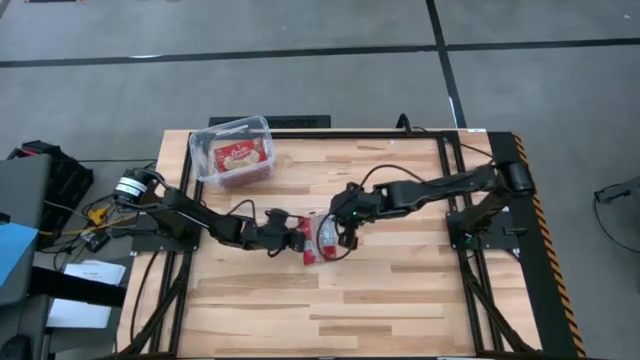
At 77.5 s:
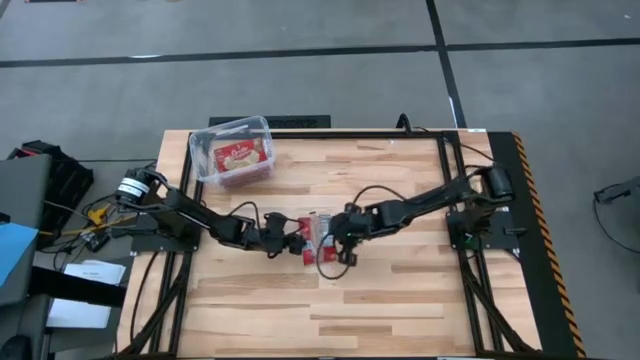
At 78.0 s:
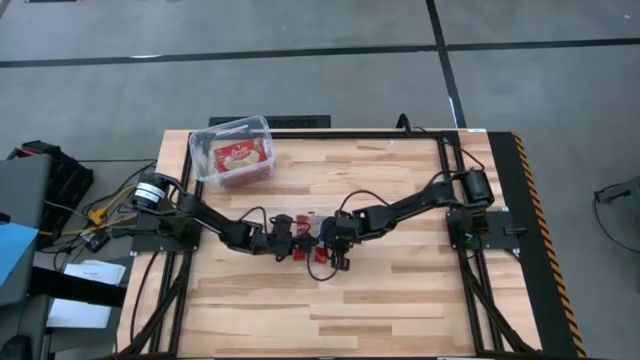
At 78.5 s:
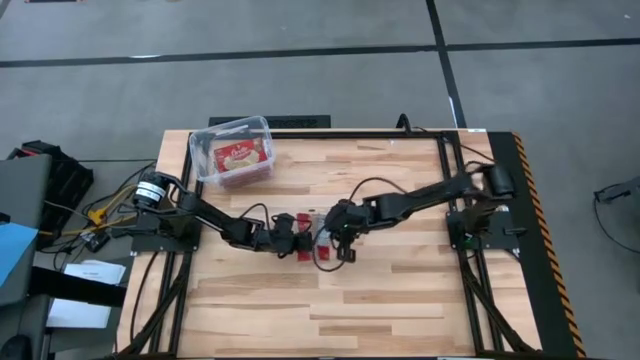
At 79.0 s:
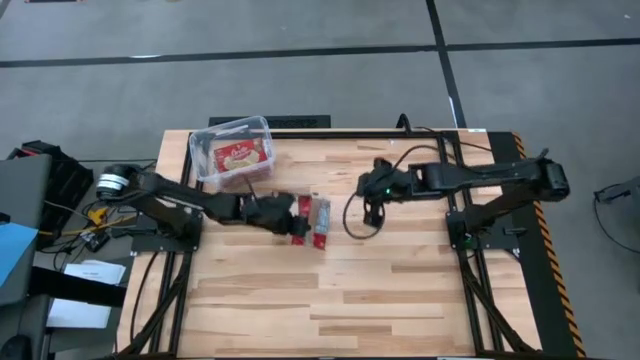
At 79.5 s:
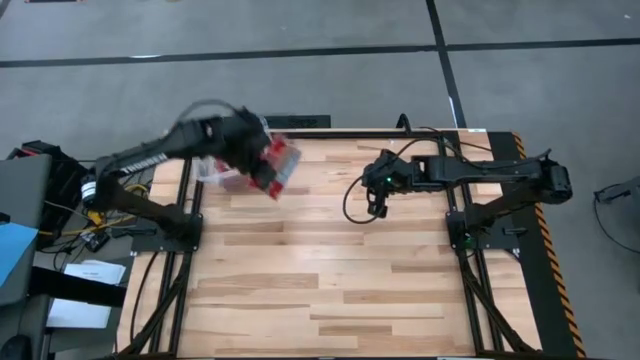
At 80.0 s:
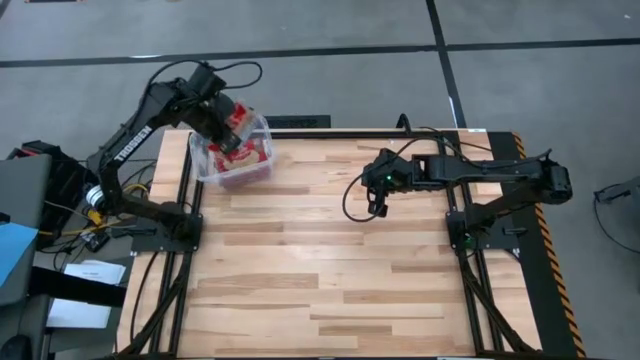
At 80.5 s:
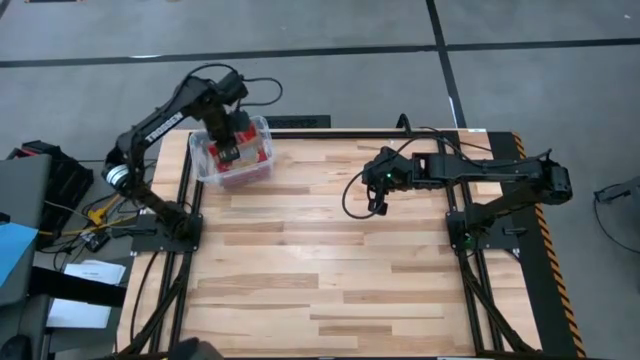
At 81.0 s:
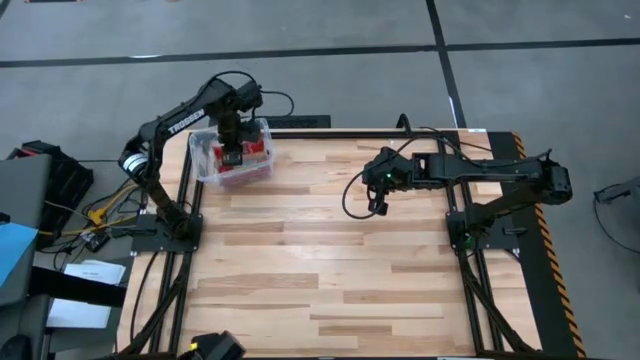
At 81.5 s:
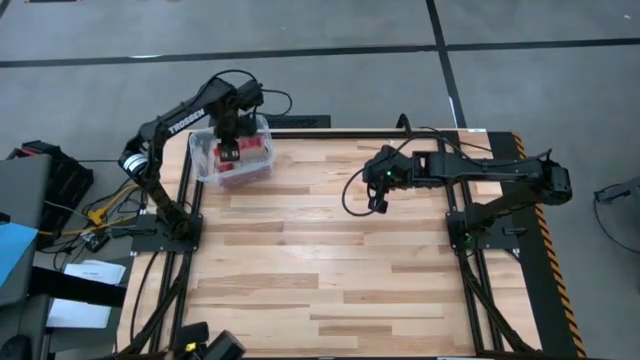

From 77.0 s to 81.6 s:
Task: Sort popcorn bags into baskets
Put the red popcorn bag into the transparent bin

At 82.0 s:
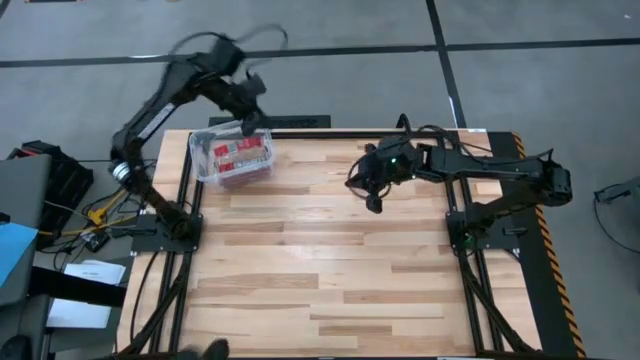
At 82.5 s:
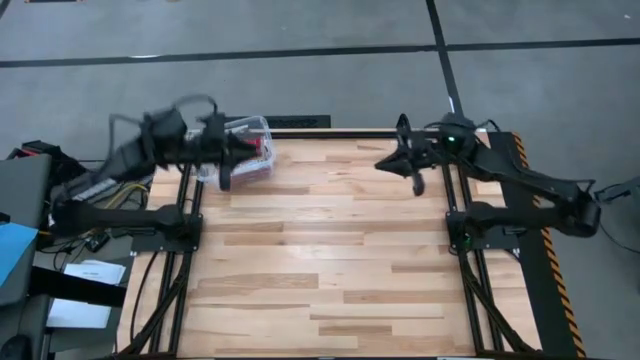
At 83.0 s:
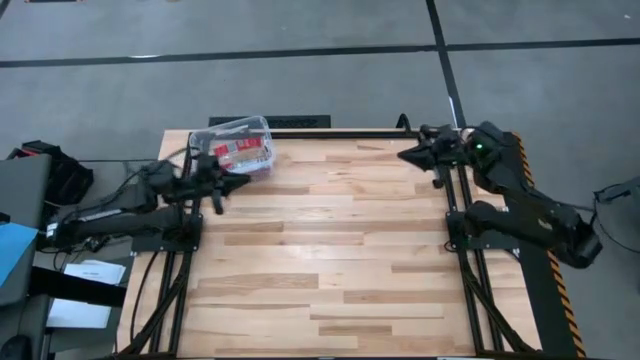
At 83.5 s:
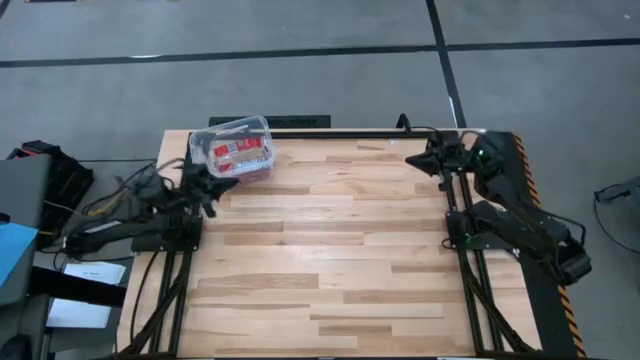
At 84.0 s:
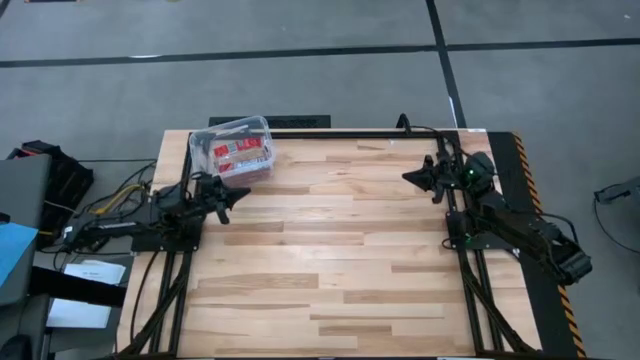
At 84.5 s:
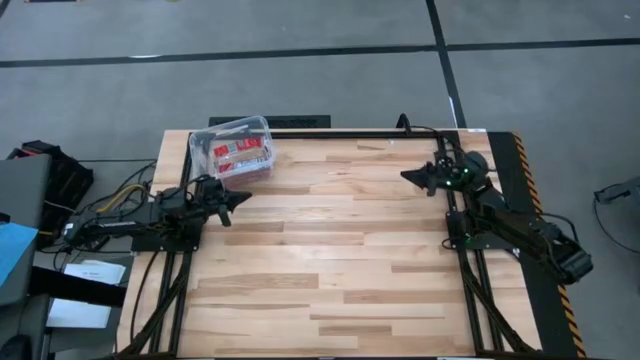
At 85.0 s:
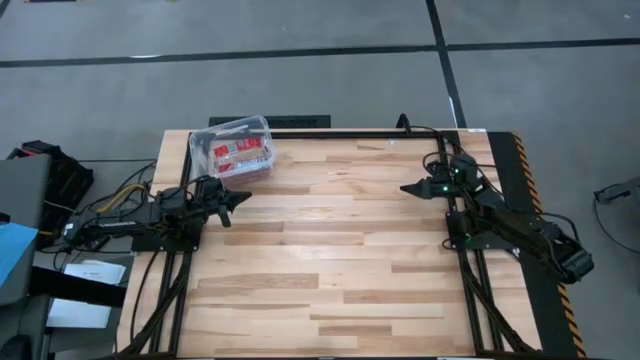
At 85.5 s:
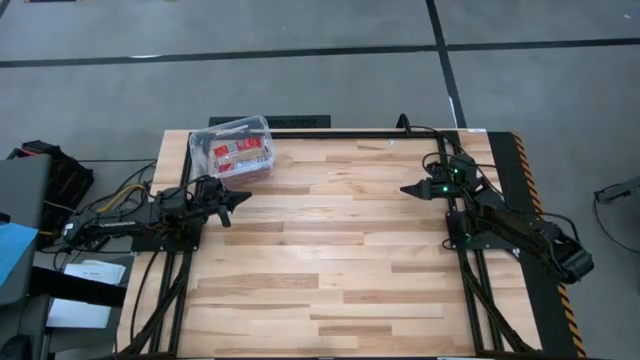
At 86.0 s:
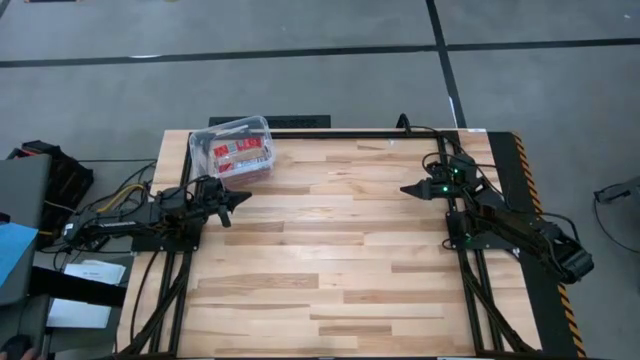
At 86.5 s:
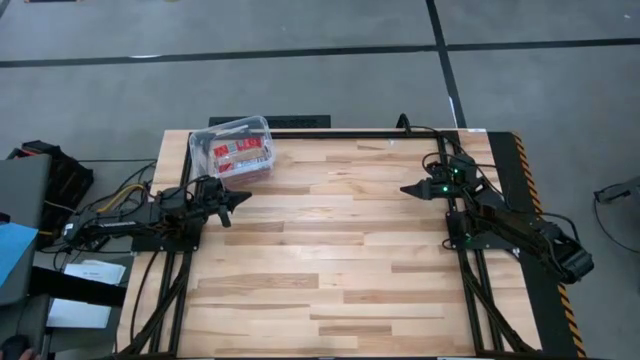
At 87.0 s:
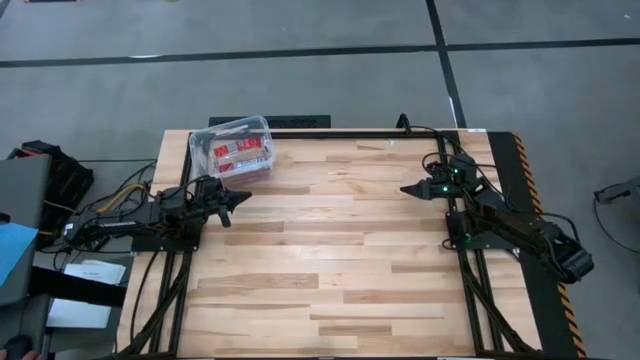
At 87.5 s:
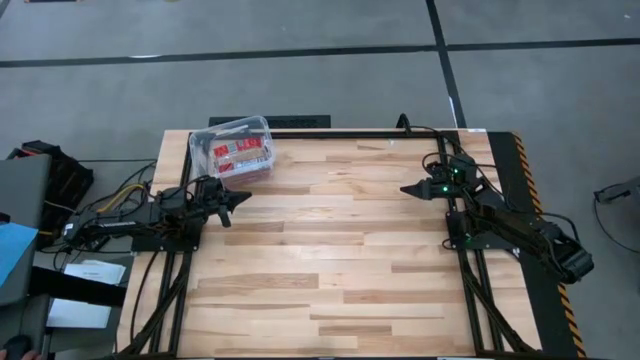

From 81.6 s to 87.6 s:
Return to Home Position

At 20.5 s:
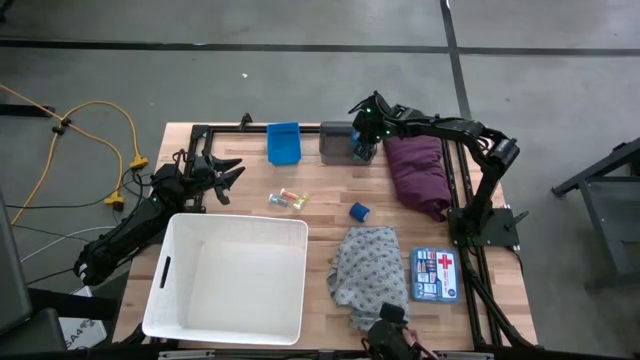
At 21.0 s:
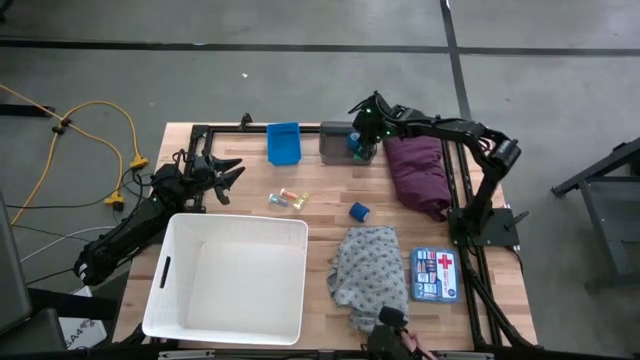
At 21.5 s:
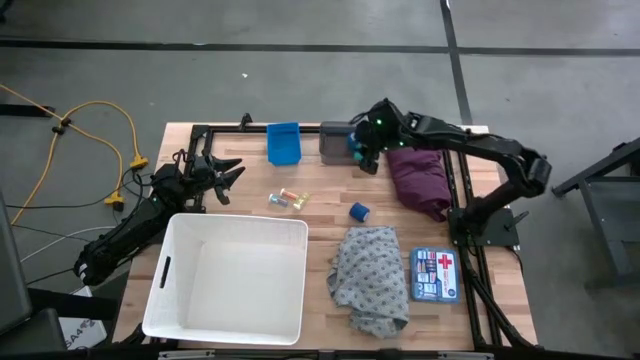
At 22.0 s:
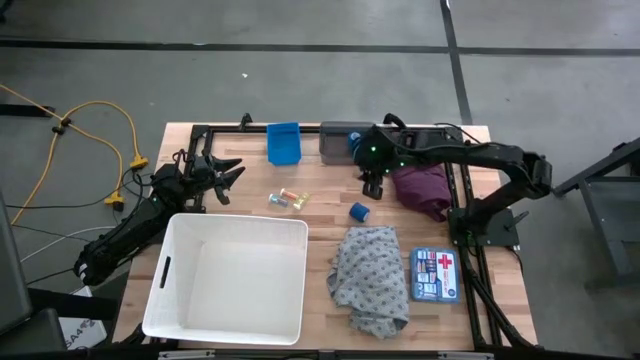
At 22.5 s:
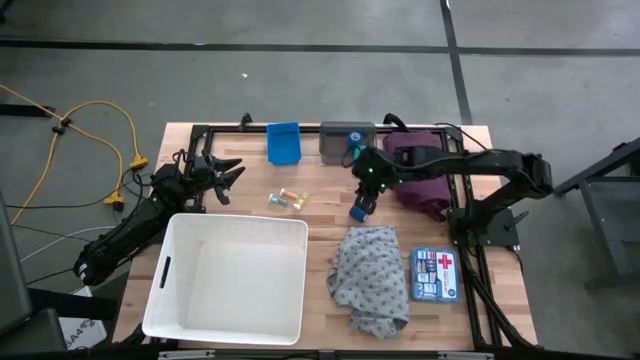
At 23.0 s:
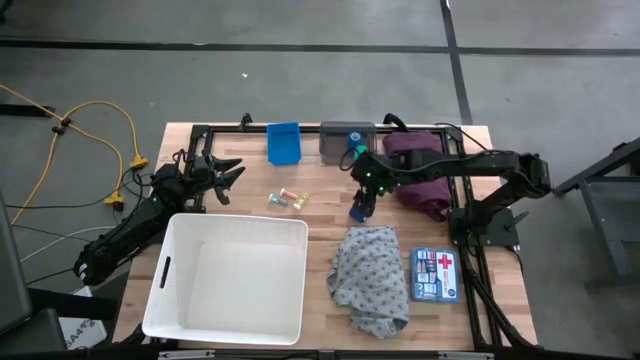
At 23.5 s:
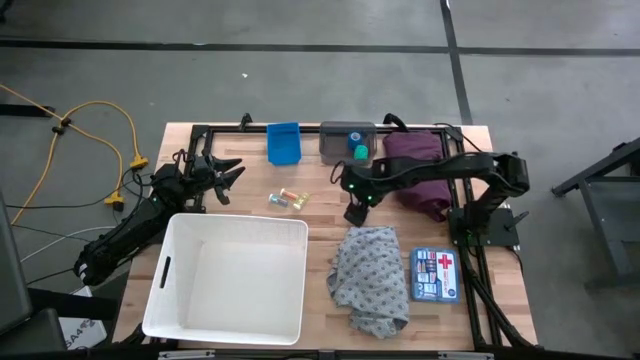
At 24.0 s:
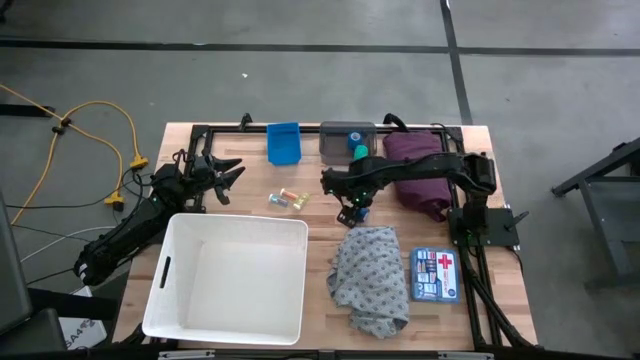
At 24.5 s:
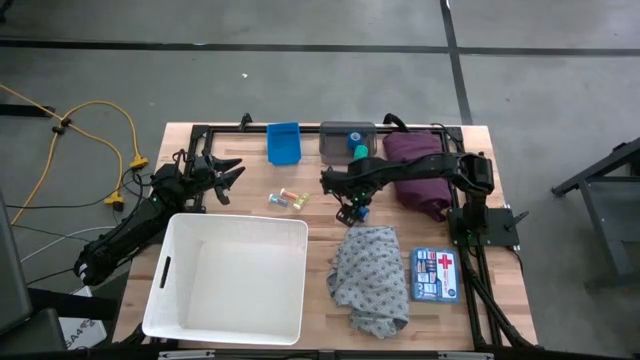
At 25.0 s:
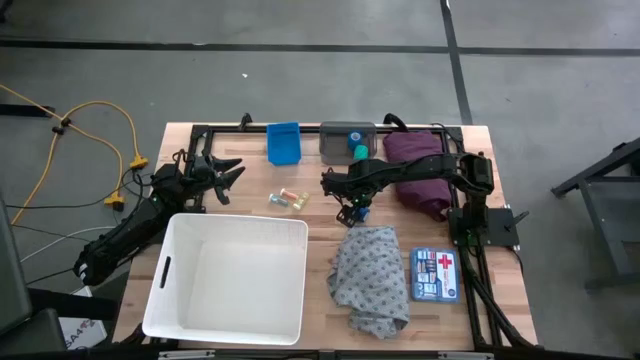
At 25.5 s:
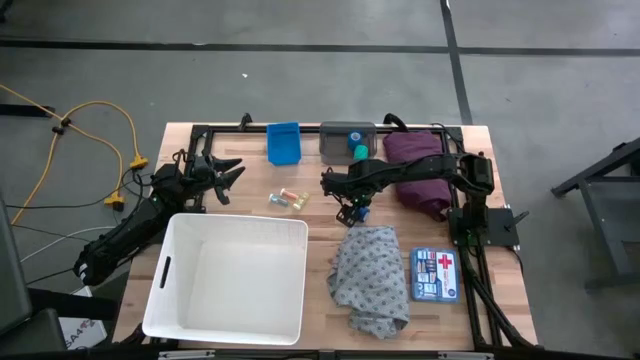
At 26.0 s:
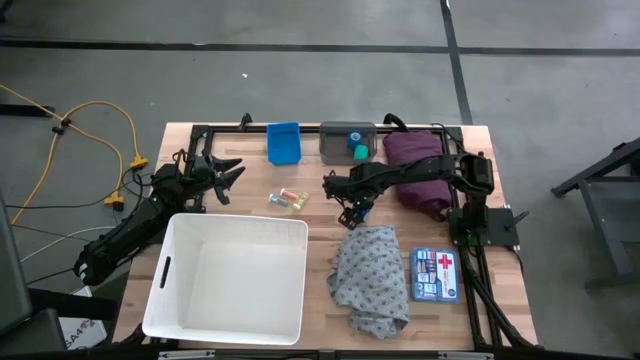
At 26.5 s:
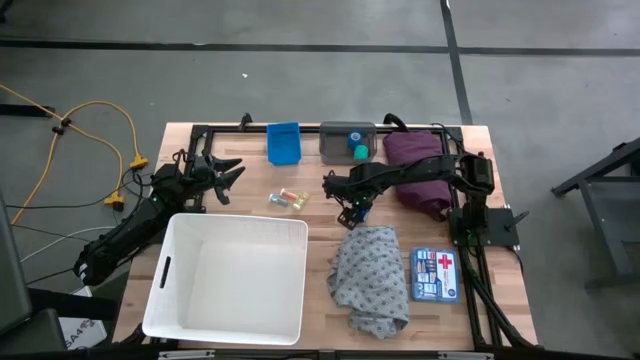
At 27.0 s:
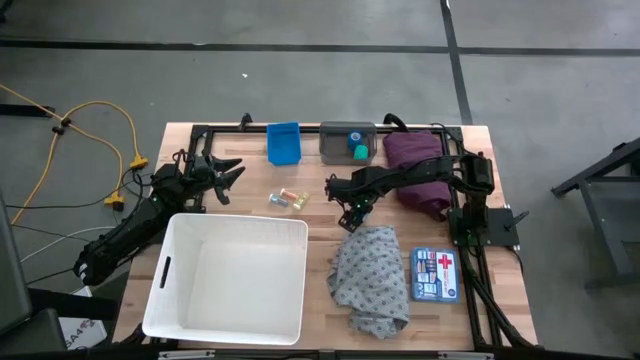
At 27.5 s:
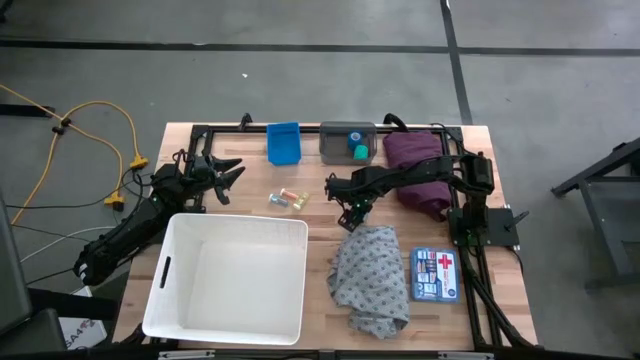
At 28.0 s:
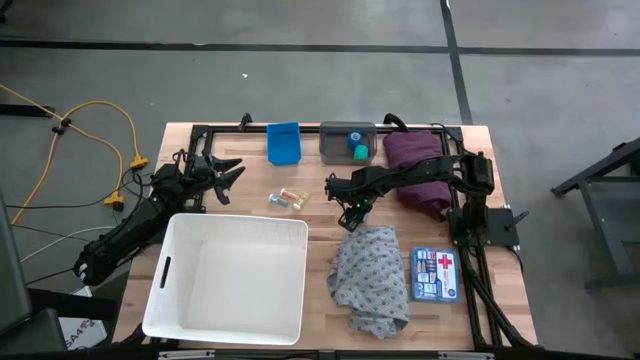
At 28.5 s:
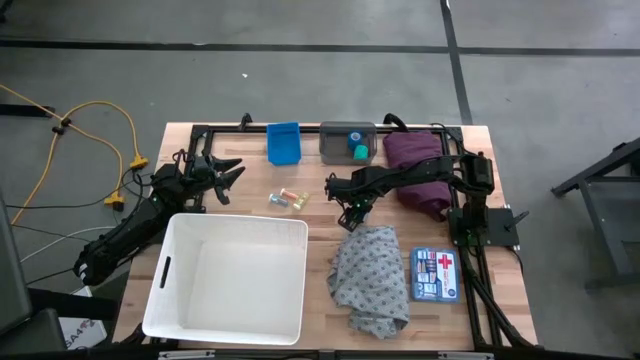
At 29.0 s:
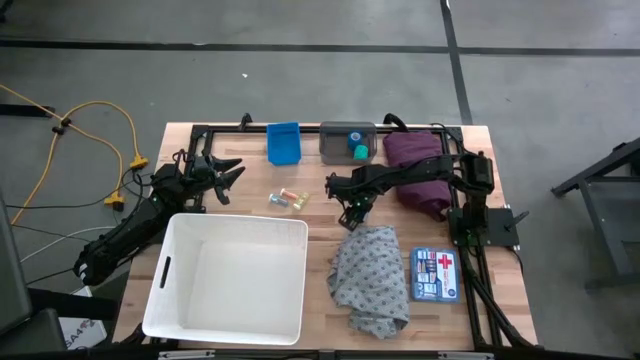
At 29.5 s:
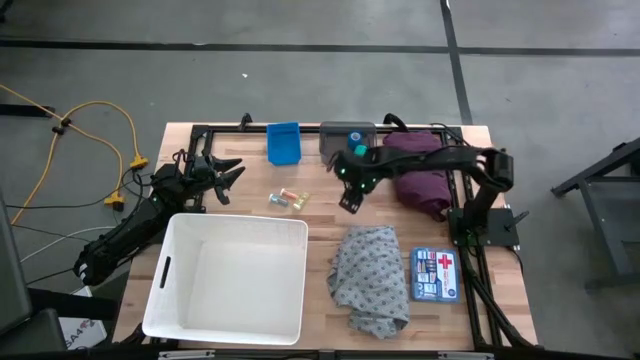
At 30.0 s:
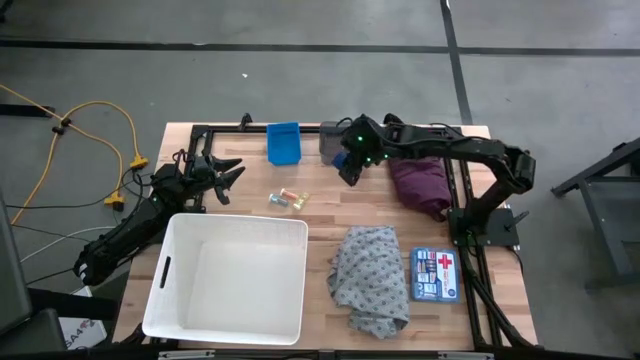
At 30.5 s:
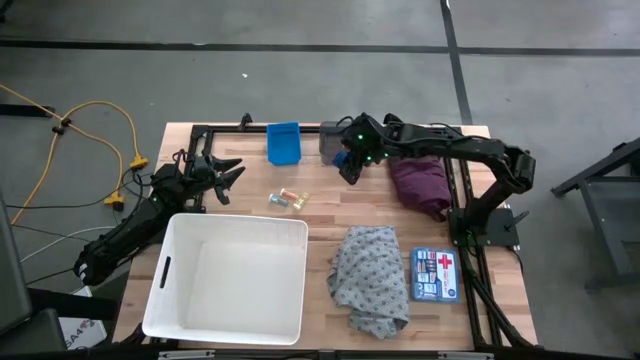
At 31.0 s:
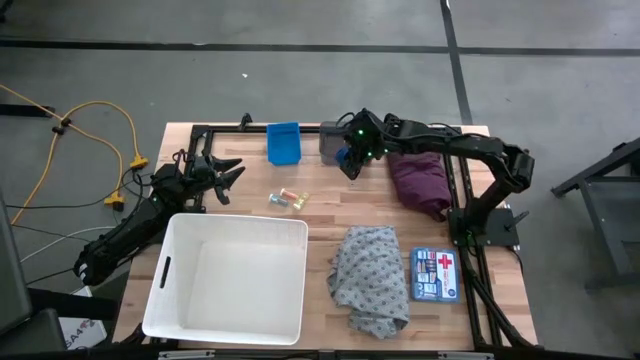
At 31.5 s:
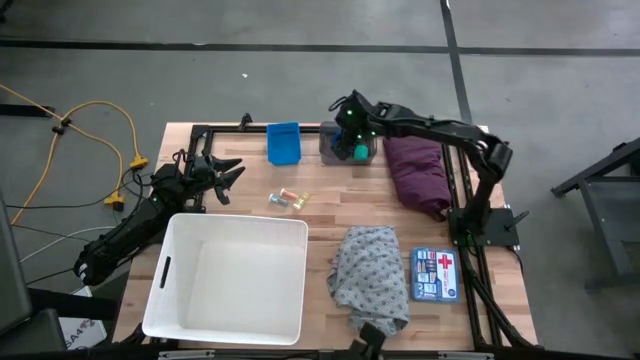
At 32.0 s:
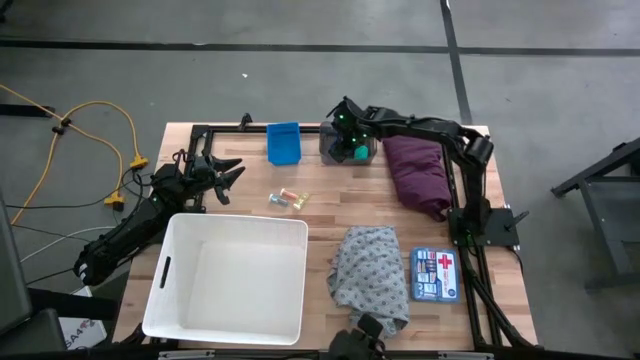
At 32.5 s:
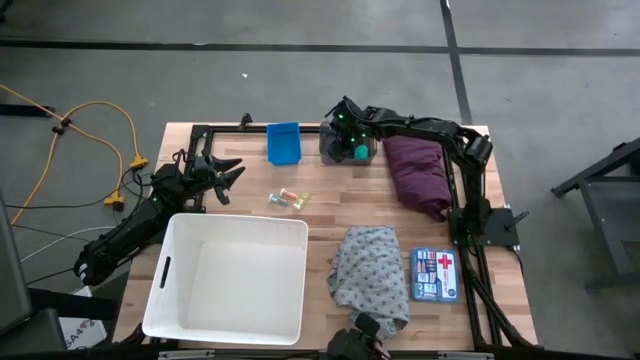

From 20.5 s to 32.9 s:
Task: Pick & place medical supplies in basket/bin
Put the blue bandage into the black bin
